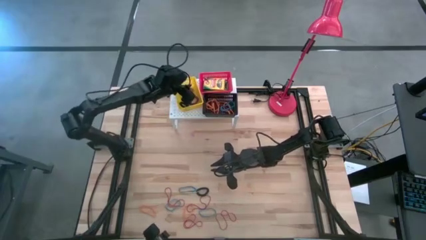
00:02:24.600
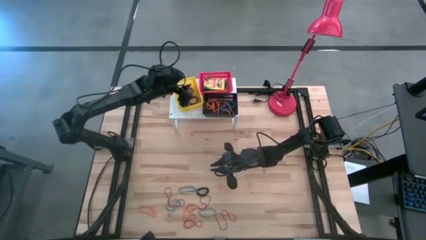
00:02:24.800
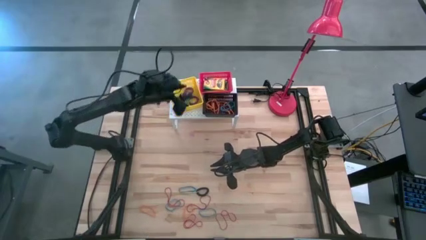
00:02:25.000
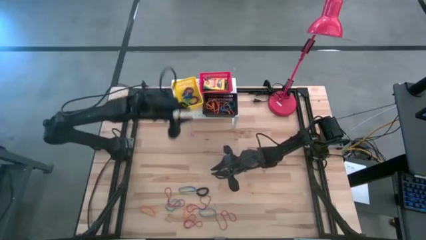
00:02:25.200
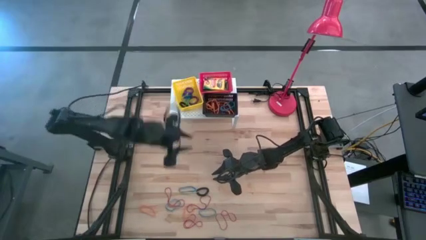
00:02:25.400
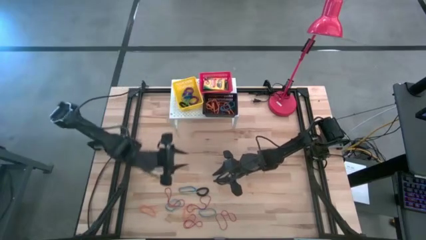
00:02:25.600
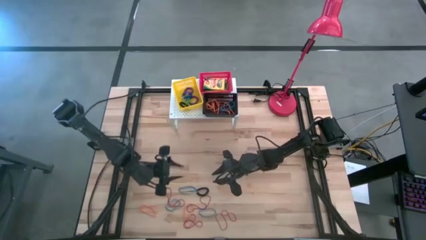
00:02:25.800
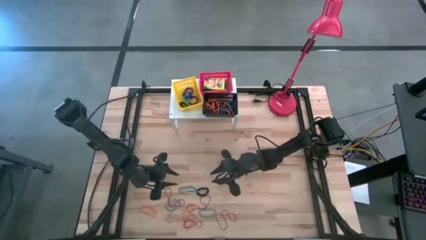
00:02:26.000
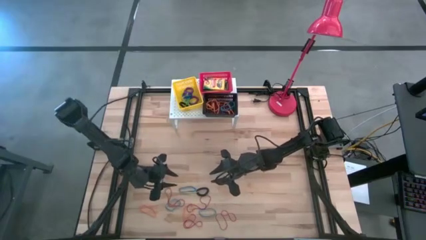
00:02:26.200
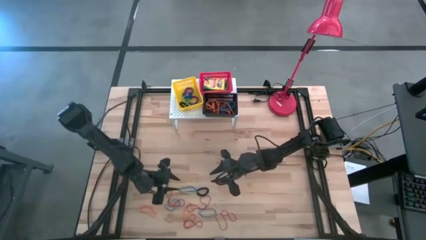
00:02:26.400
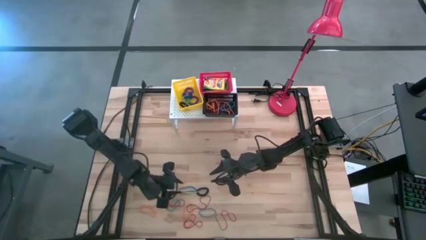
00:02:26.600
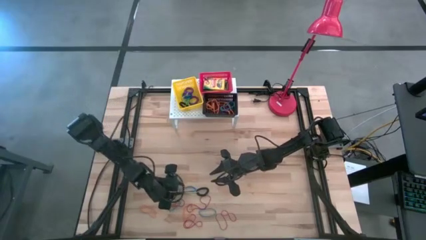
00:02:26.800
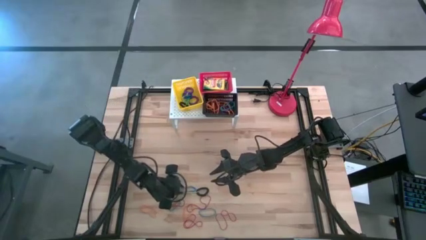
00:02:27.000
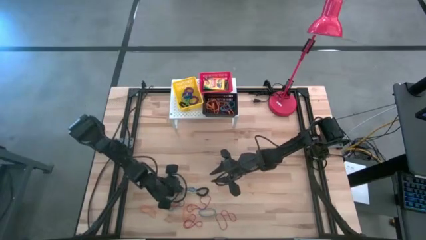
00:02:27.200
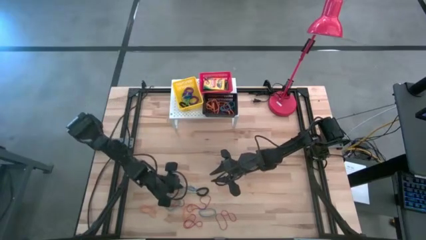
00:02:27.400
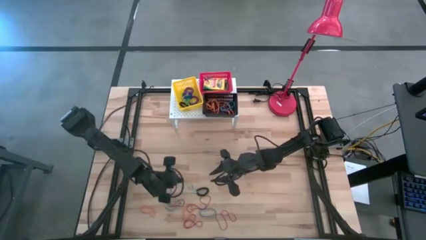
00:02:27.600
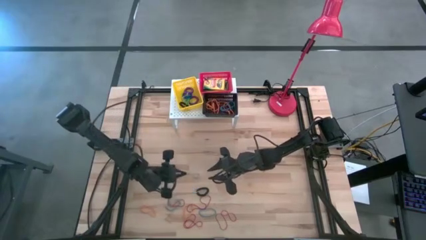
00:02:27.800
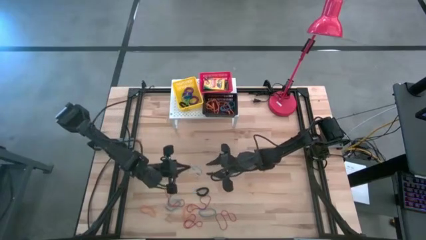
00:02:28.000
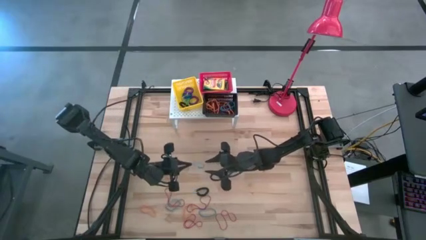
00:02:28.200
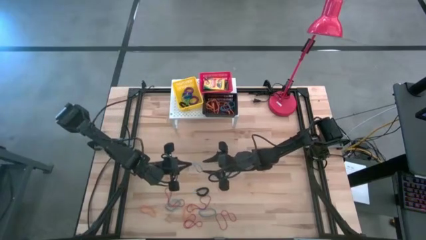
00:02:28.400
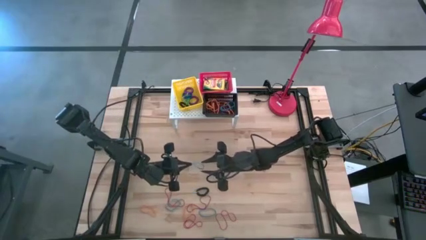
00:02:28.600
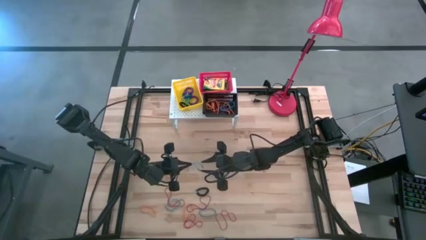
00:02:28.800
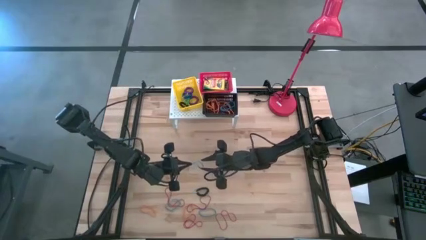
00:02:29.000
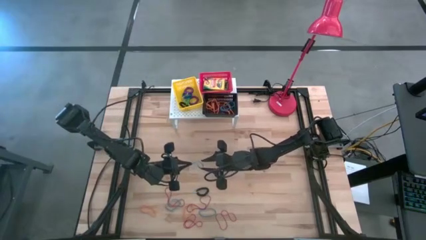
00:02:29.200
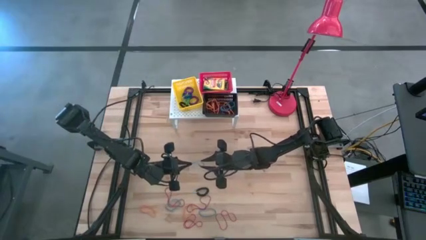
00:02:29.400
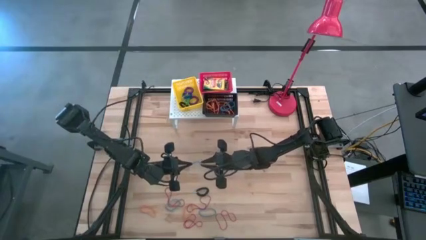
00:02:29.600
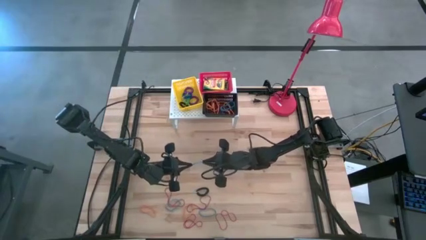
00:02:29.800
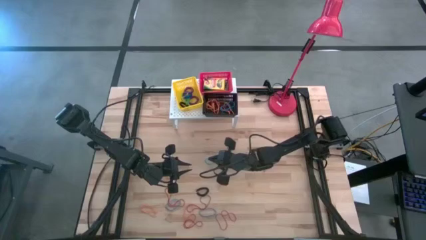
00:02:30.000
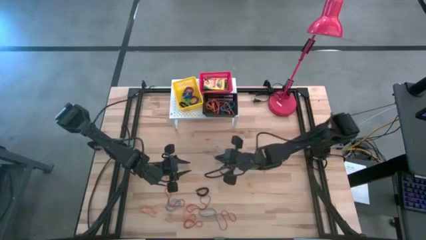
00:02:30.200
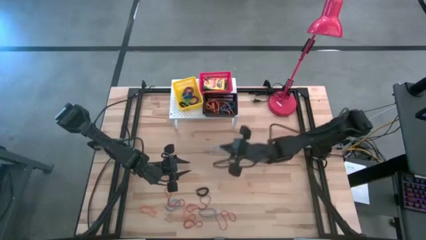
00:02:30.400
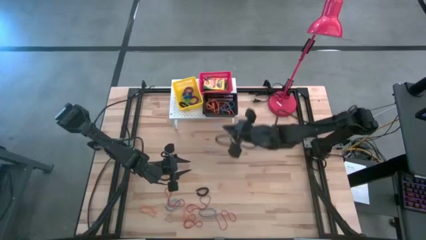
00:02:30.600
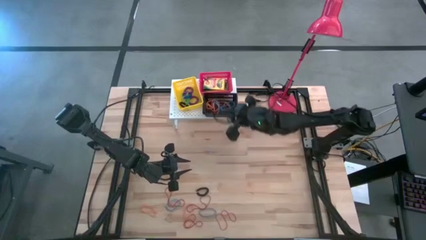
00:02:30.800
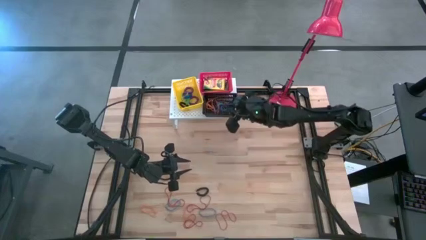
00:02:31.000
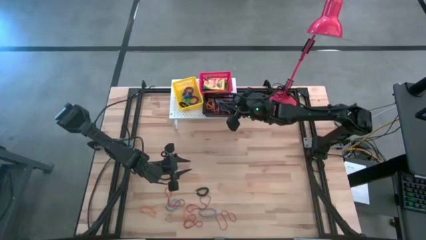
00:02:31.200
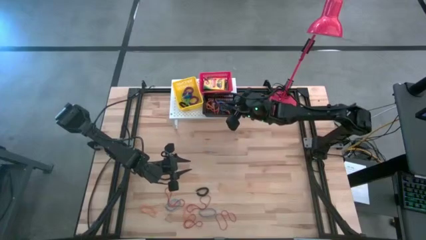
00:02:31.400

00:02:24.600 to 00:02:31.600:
Task: Pick & Place Office Desk Supplies
Put the blue rubber band into the black bin on the shelf

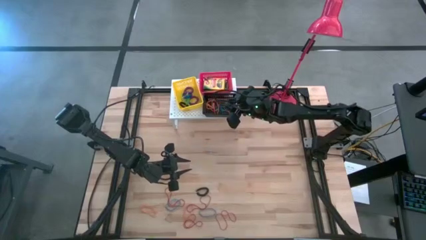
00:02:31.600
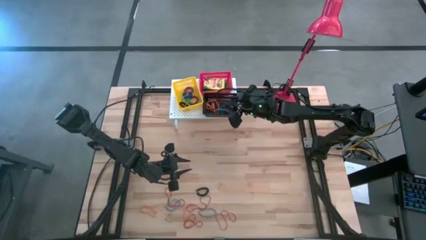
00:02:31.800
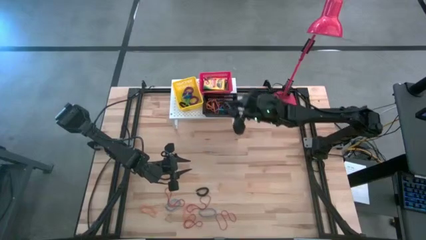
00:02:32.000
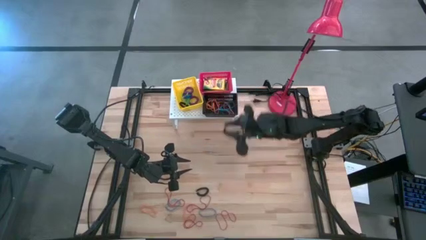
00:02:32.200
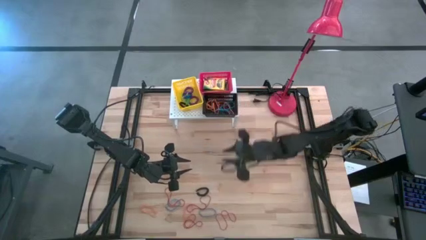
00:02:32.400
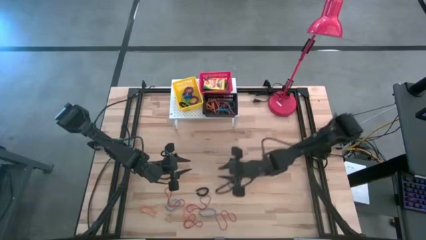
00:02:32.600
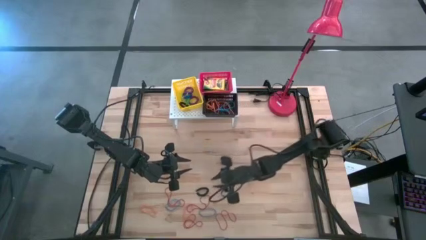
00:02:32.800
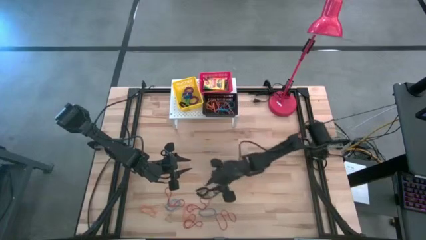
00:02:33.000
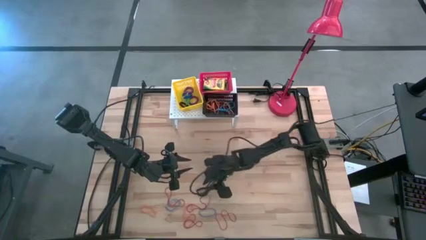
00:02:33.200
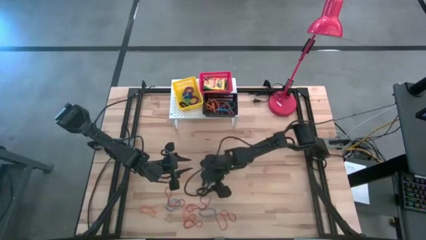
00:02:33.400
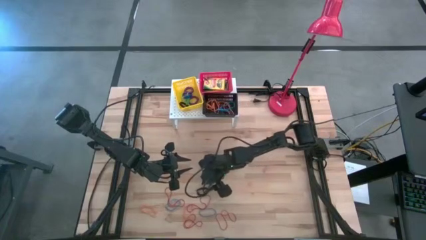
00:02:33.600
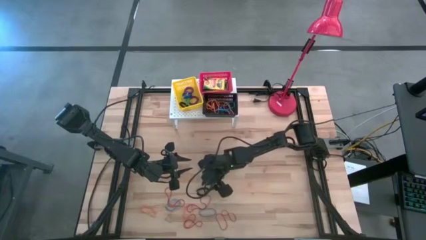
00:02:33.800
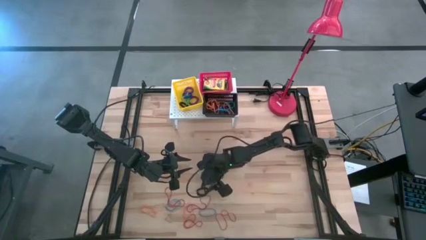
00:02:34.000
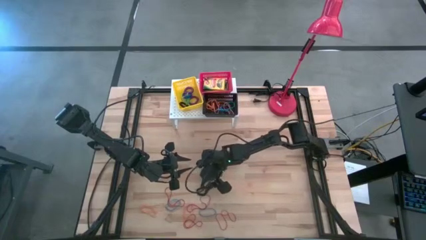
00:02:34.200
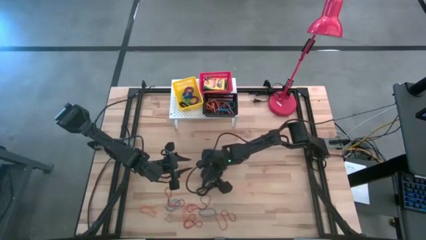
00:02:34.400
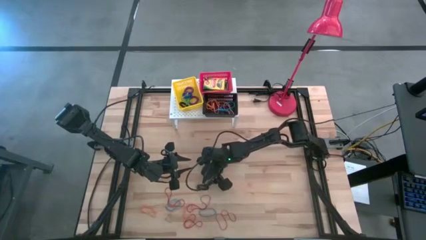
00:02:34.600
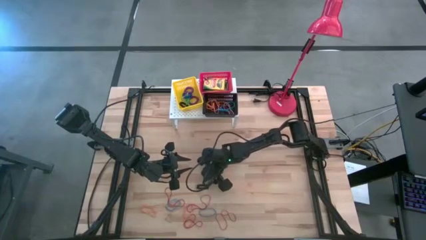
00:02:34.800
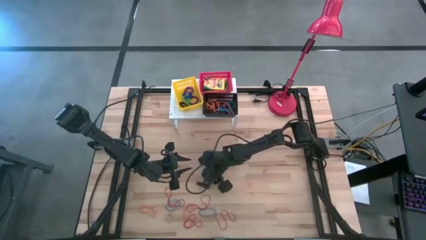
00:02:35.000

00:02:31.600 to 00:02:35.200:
Put the black spring keychain into the yellow bin on the shelf

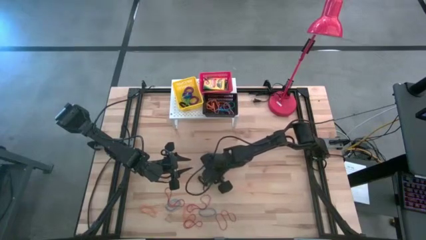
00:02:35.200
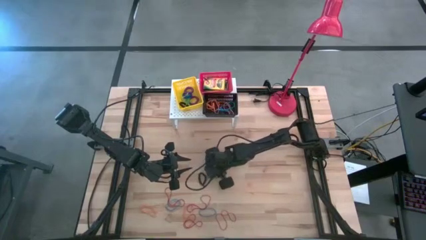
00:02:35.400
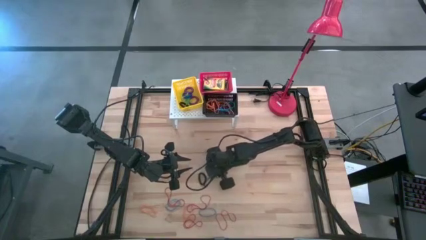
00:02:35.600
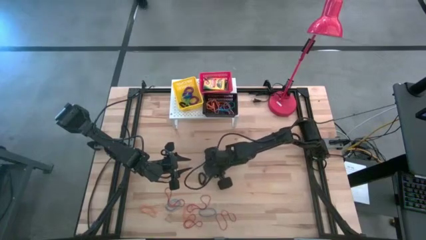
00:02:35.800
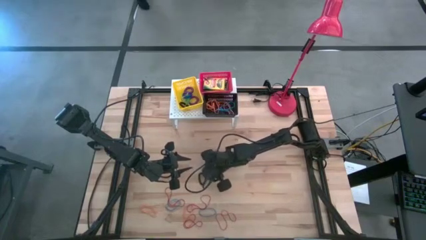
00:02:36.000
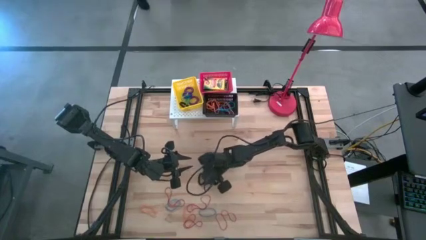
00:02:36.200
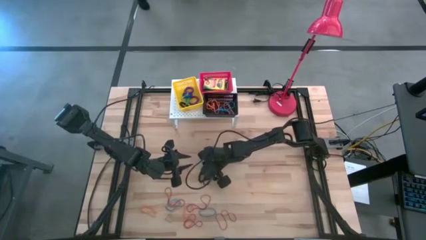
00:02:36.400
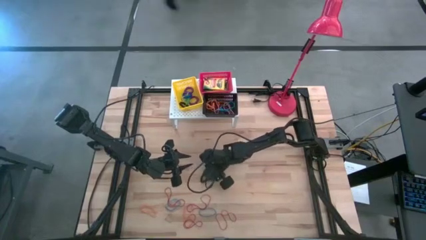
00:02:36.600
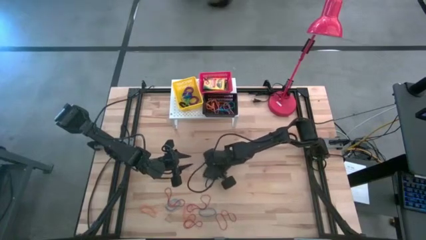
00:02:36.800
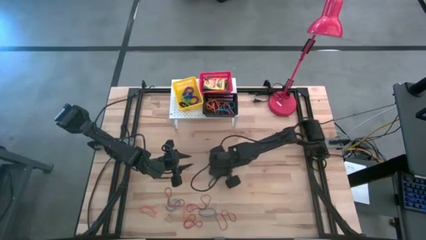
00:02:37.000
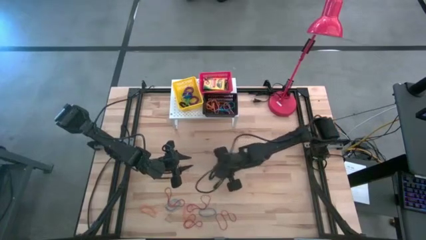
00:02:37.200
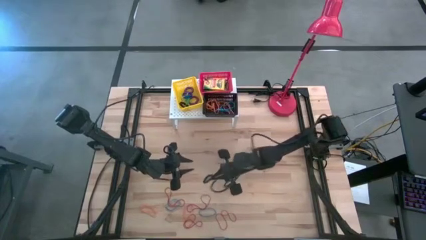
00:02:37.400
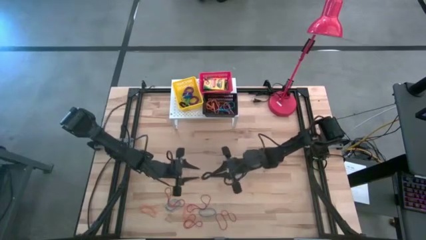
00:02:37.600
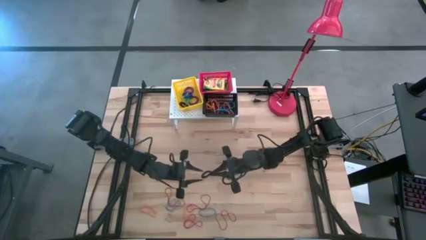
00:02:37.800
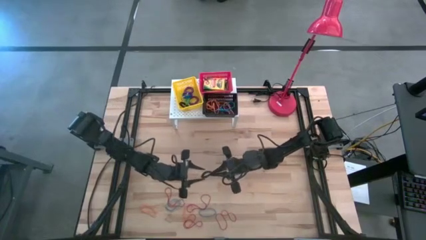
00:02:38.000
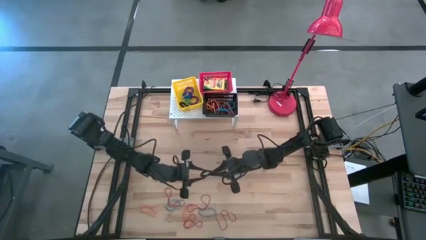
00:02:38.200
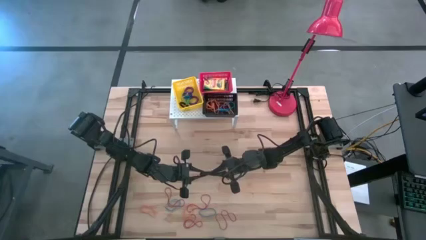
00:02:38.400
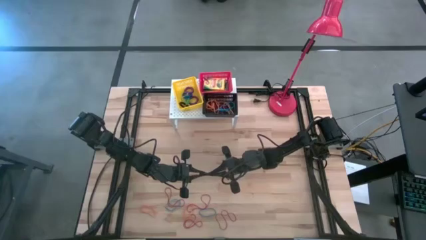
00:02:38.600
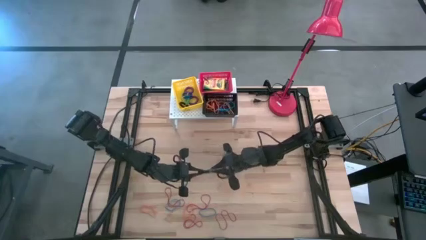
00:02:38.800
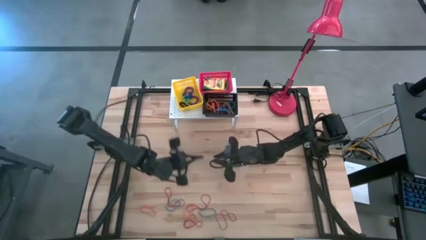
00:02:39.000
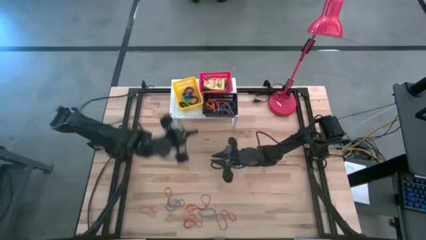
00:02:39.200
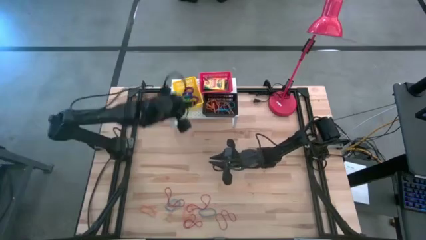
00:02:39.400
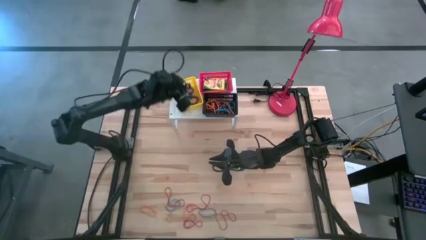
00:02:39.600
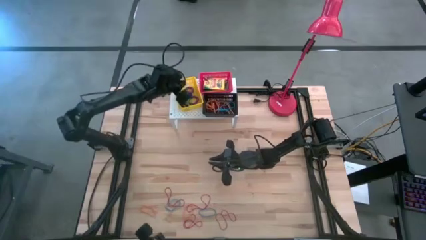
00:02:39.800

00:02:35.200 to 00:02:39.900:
Put the black spring keychain into the yellow bin on the shelf

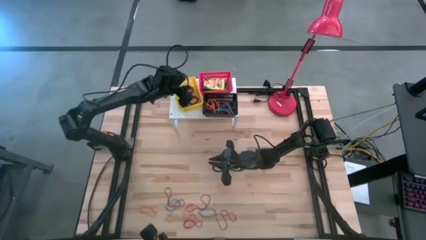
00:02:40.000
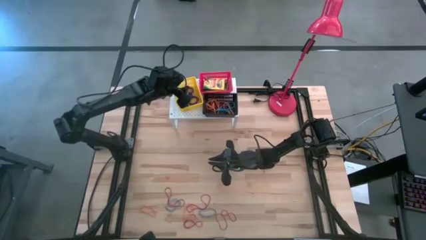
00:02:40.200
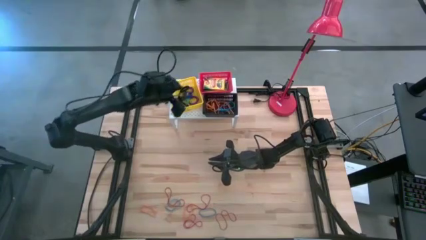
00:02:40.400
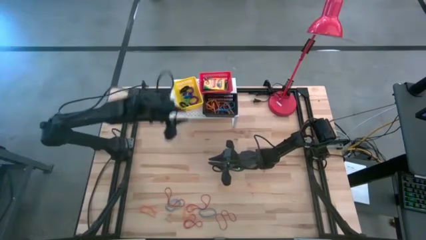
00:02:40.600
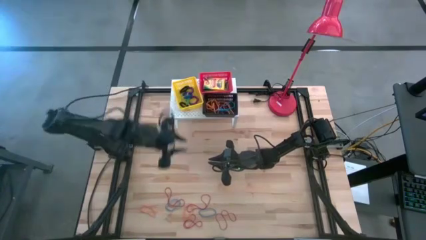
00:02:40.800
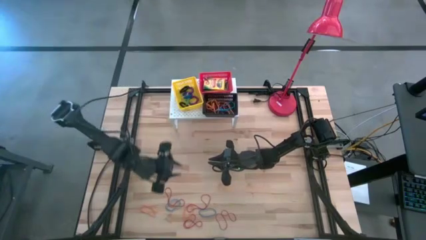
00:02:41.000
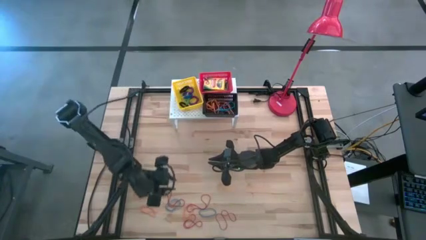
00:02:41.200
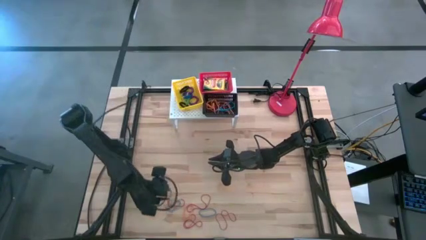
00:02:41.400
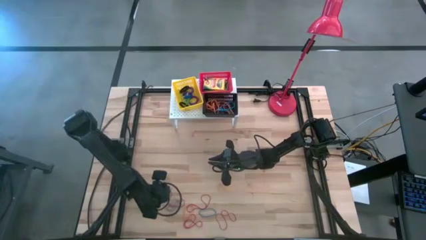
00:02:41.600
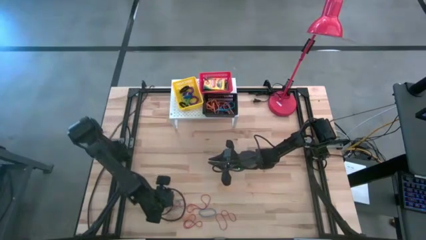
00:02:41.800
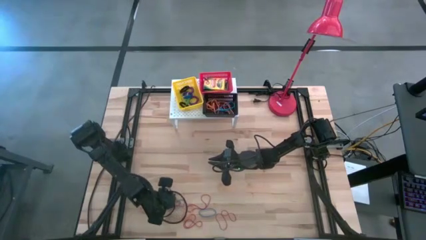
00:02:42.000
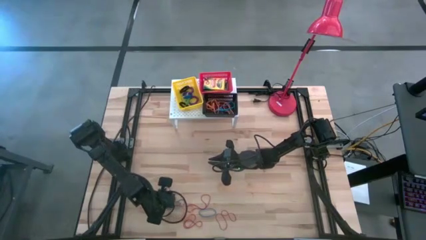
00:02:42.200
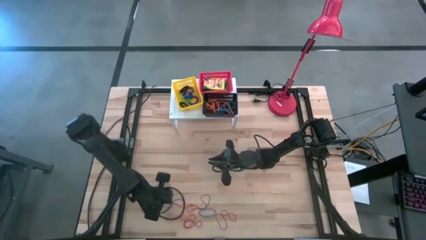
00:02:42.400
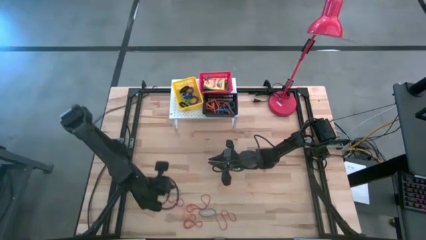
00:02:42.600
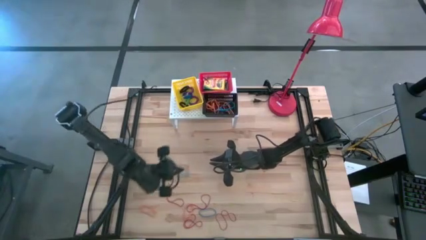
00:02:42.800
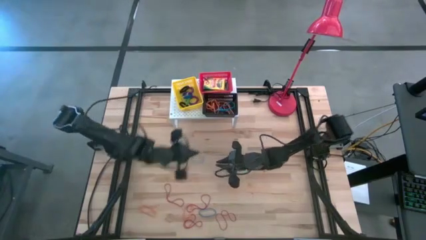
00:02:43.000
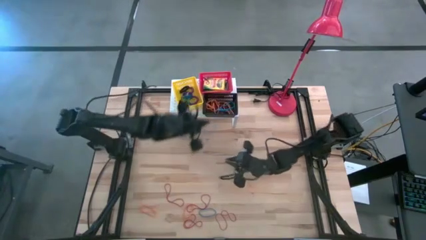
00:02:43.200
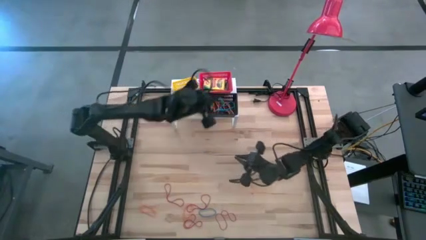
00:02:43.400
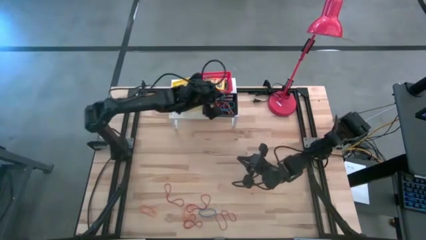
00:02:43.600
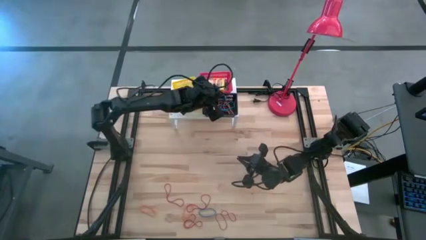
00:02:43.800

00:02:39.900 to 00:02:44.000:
Put the blue rubber band into the black bin on the shelf
